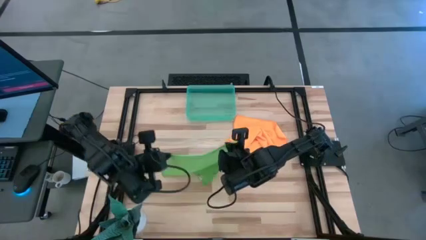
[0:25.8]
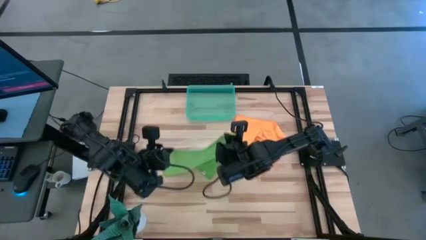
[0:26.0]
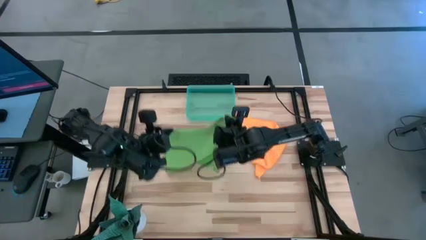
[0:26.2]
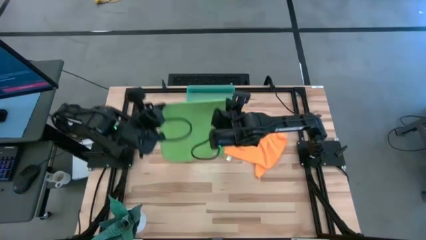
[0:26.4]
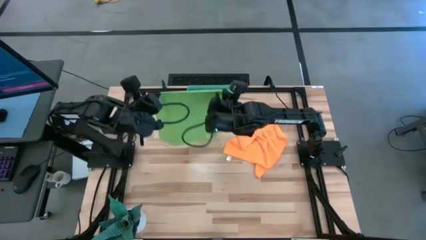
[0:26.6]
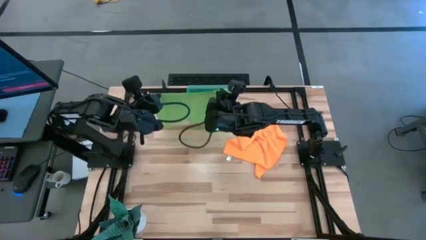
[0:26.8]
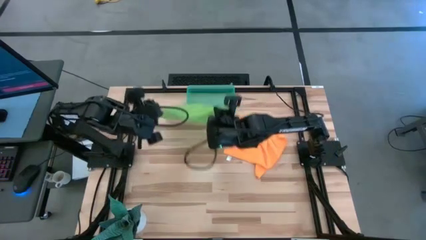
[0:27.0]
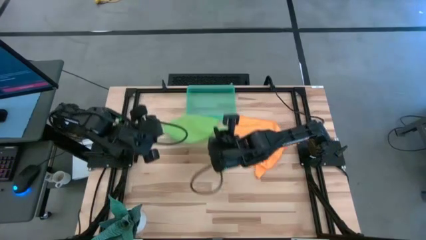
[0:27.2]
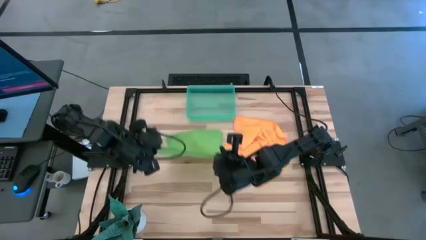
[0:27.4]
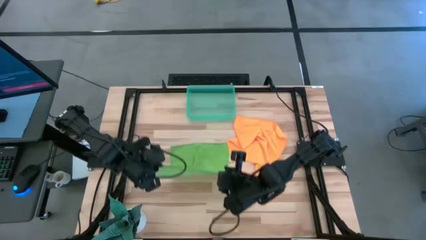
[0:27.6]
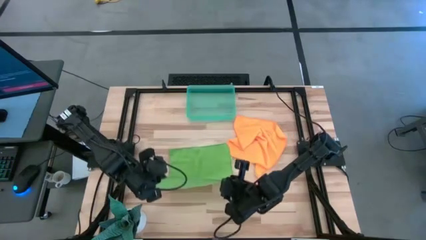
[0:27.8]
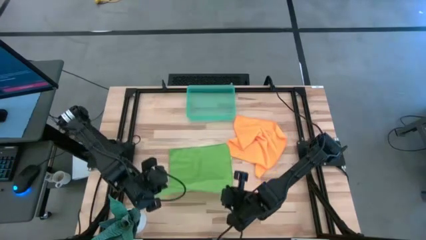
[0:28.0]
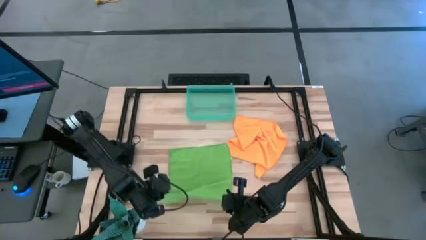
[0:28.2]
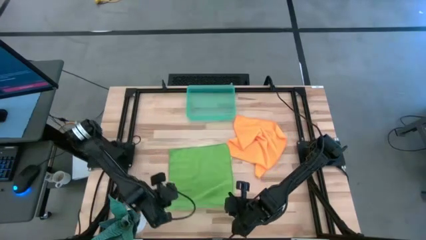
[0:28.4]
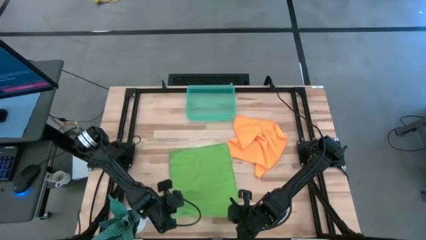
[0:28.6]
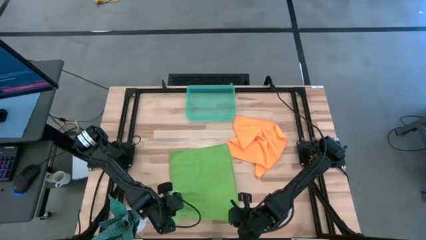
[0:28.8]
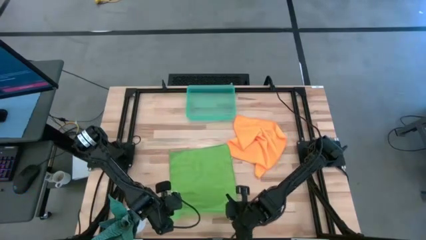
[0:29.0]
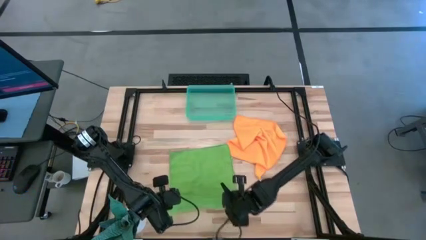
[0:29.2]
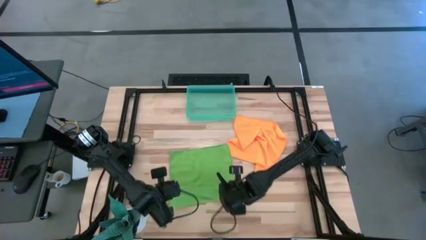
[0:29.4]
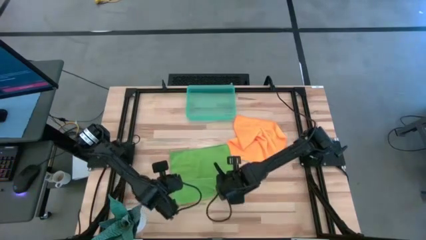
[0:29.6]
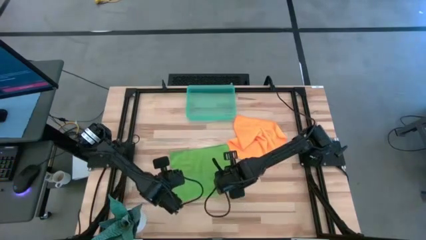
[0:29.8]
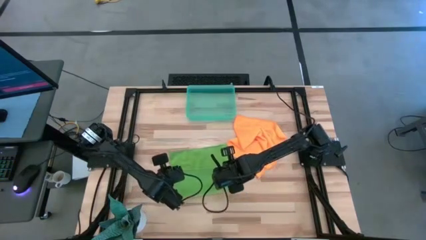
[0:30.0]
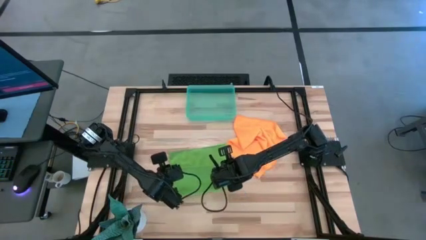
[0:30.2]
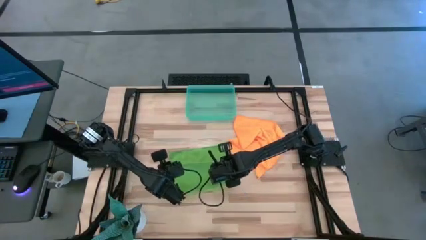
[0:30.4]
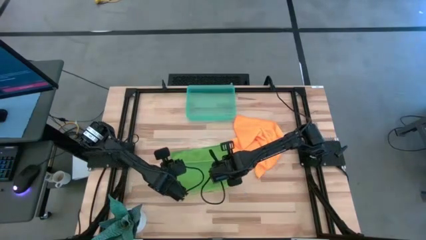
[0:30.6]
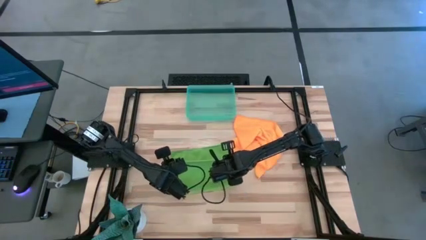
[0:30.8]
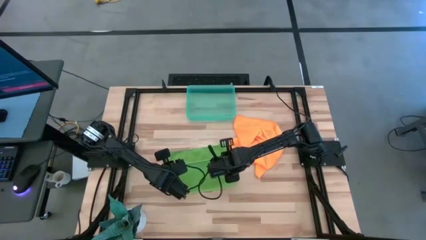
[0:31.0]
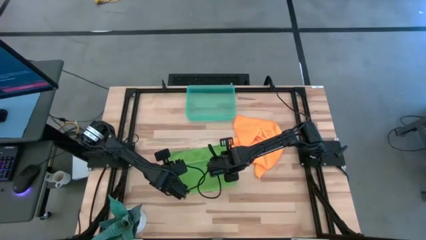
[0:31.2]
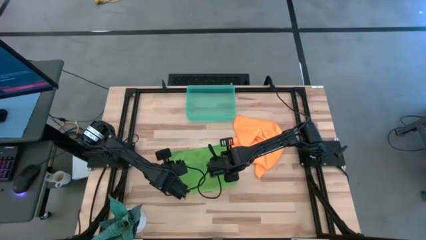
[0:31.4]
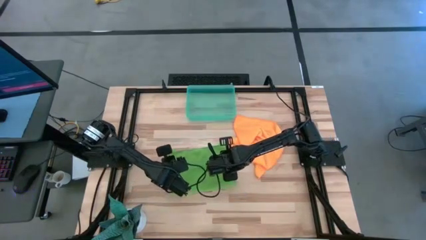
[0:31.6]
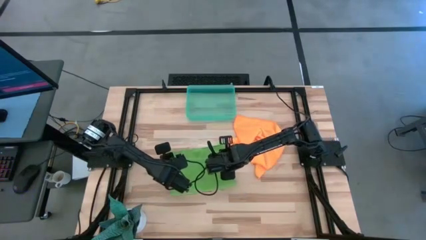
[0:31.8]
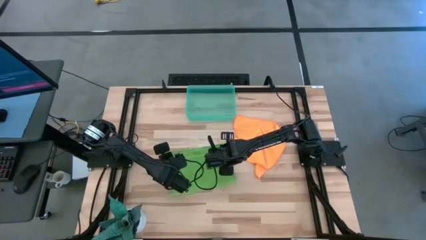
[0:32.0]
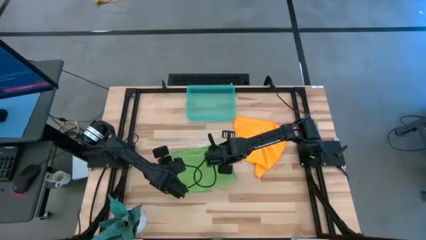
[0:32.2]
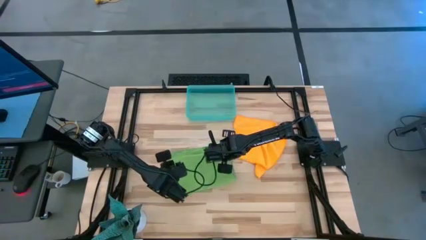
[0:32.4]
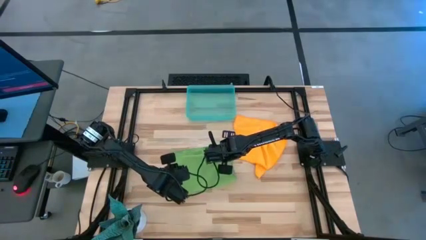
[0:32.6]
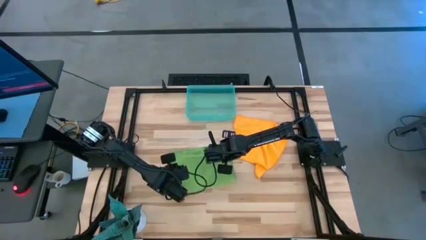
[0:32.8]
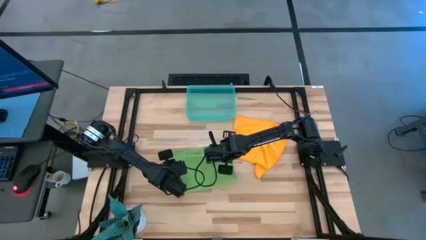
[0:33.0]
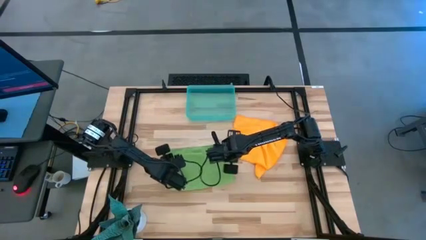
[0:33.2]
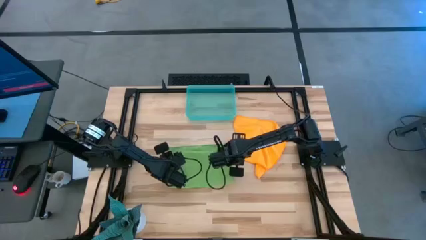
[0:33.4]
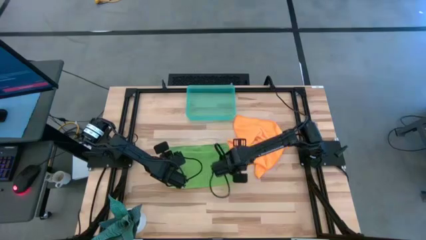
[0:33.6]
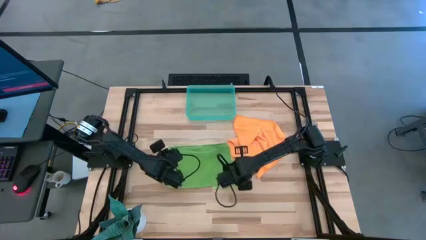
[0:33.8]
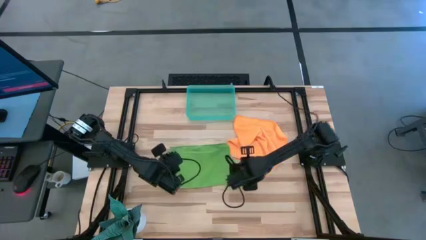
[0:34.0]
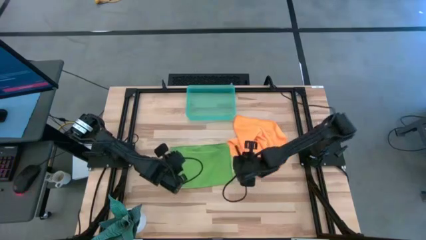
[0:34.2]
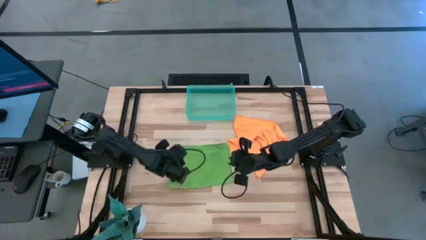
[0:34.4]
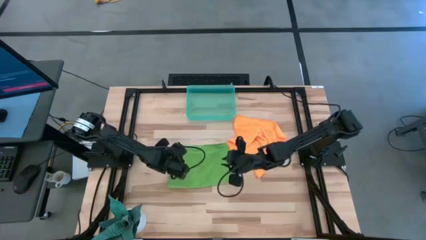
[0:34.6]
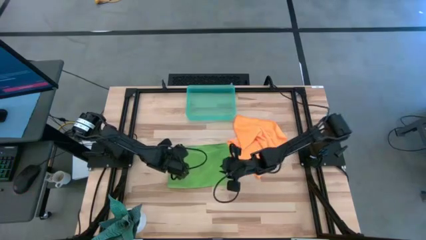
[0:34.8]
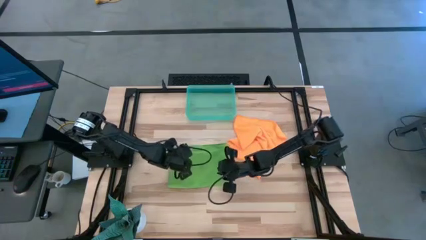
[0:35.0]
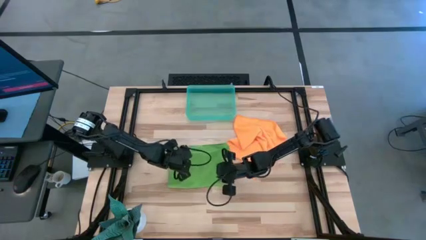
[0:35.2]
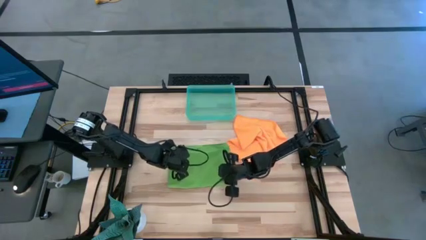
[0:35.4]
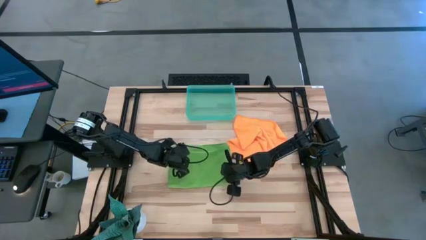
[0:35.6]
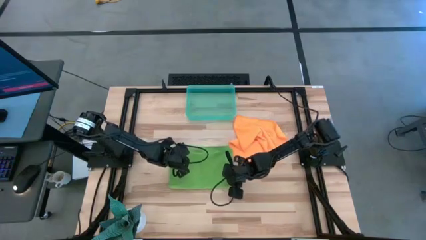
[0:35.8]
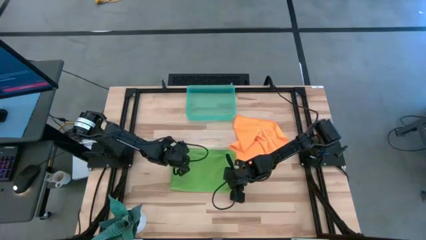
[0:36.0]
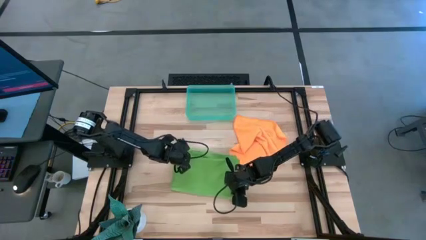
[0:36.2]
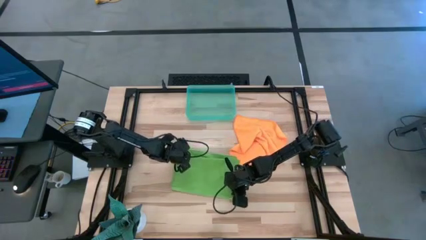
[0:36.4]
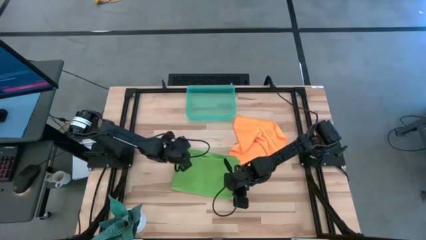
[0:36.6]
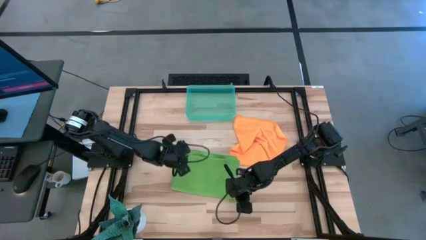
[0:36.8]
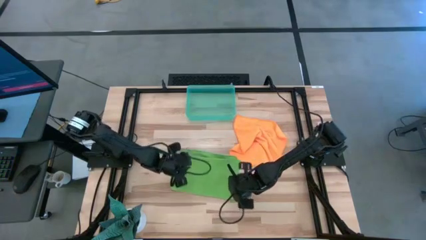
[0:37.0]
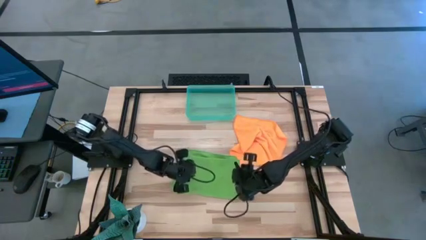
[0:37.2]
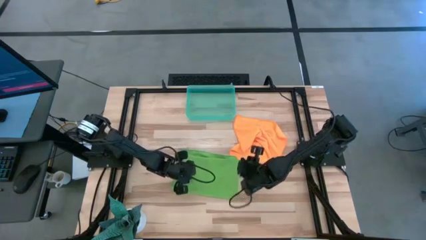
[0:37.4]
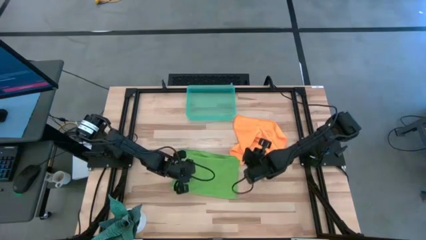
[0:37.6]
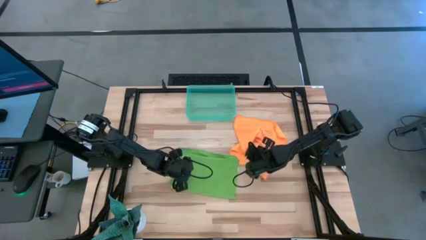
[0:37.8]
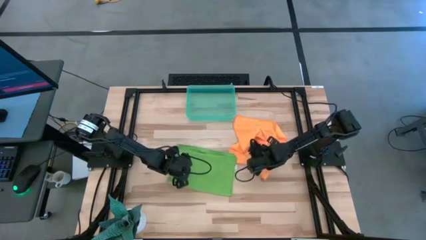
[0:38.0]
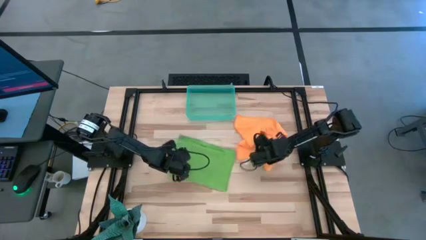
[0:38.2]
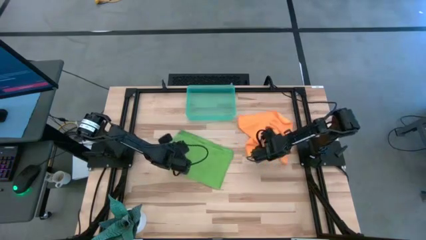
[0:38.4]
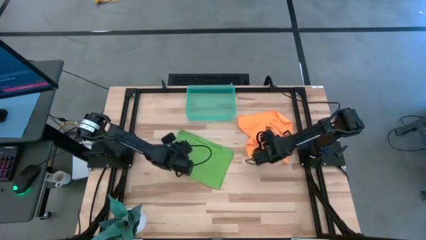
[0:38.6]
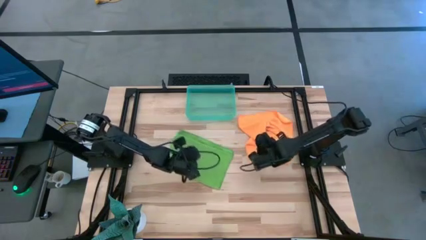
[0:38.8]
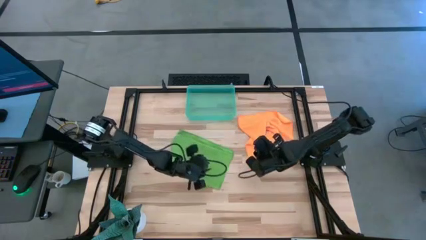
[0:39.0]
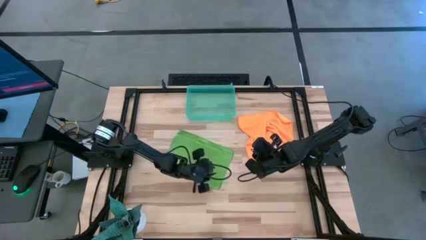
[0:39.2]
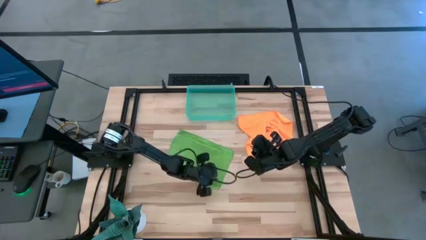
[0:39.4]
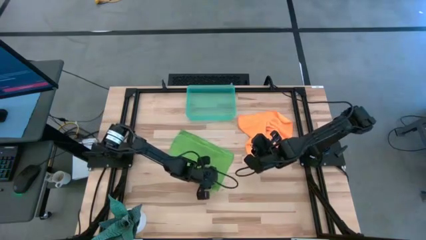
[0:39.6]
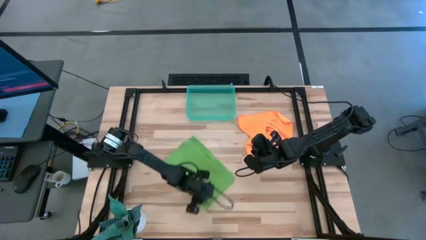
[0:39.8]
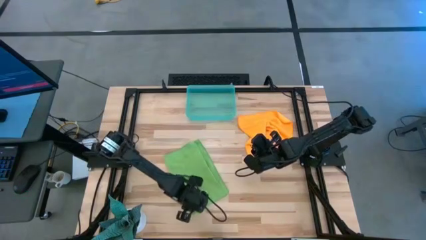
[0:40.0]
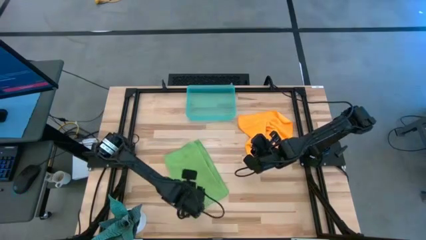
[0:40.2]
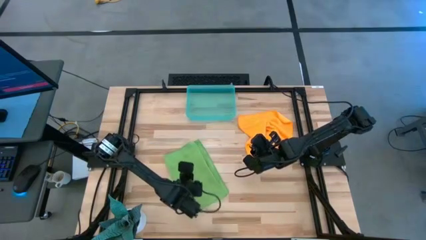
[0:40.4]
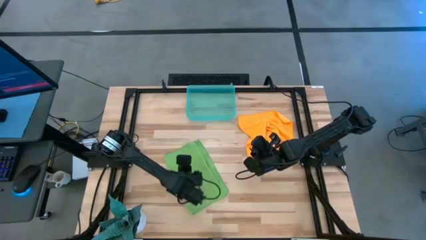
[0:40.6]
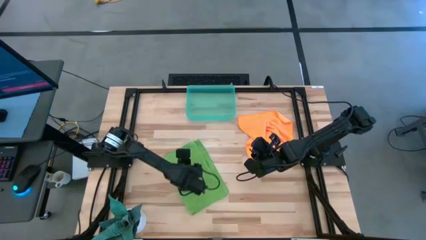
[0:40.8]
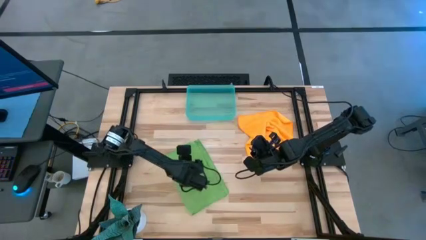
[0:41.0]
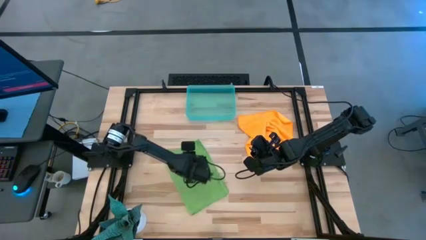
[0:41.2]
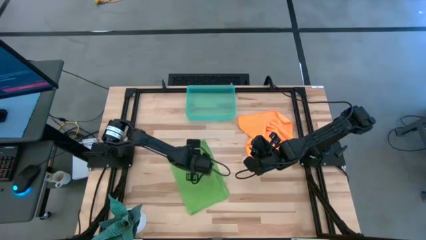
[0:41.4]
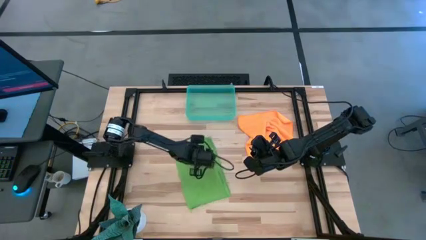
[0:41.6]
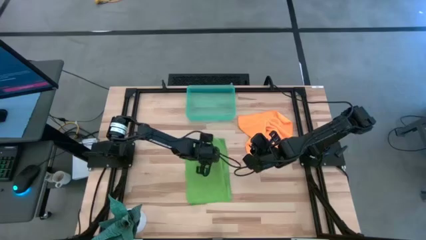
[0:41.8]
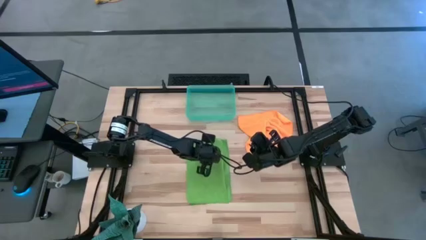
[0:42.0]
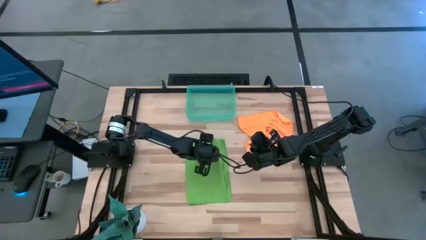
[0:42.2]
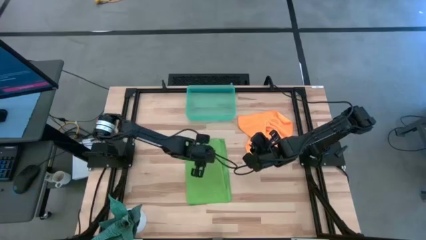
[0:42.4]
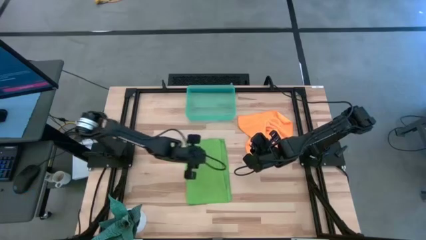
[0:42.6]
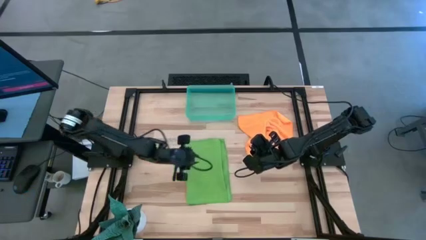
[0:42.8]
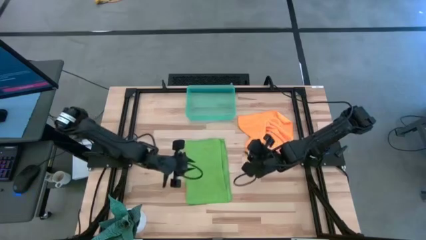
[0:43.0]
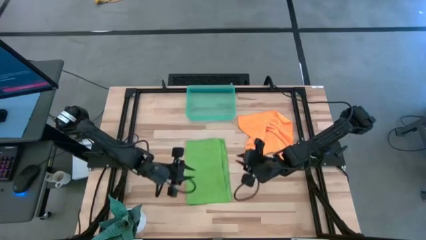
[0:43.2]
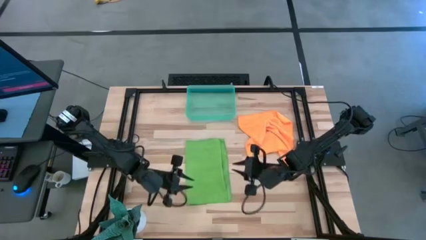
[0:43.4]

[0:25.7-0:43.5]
Task: Roll microfiber towels into tight, uniform cylinder then place into a basket
Fold the green towel
